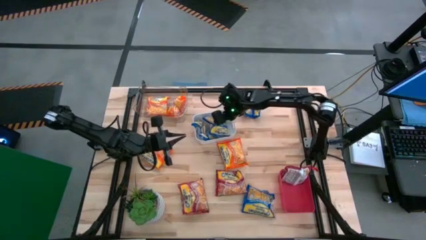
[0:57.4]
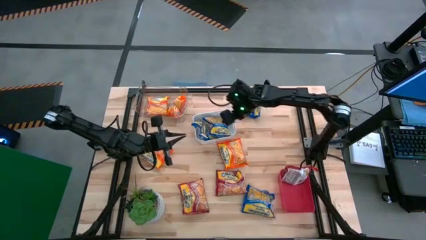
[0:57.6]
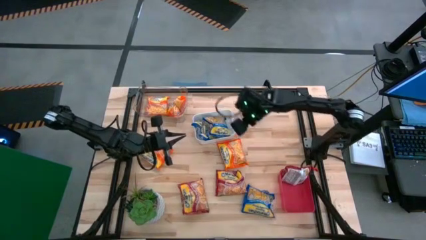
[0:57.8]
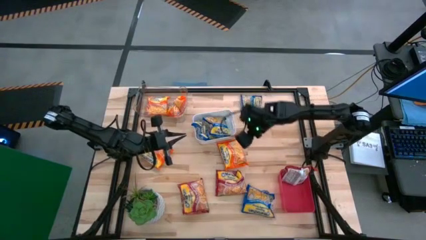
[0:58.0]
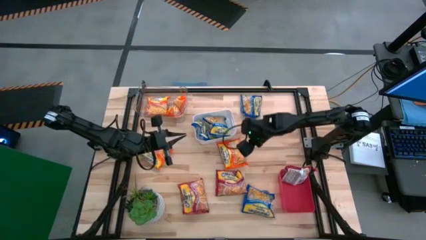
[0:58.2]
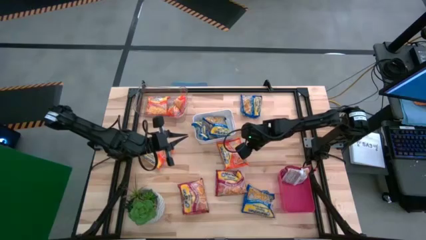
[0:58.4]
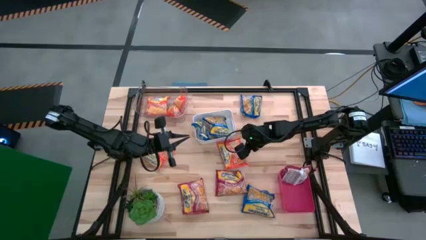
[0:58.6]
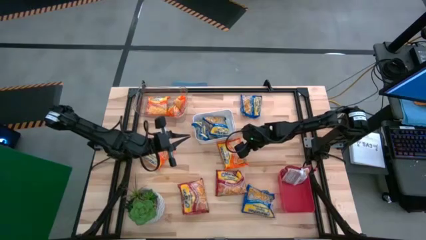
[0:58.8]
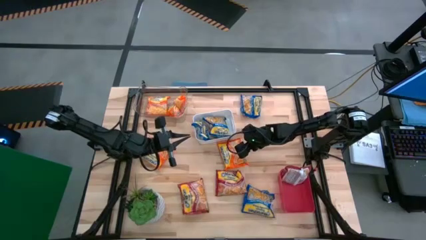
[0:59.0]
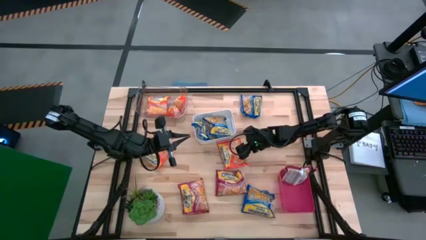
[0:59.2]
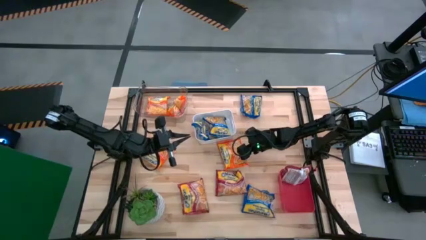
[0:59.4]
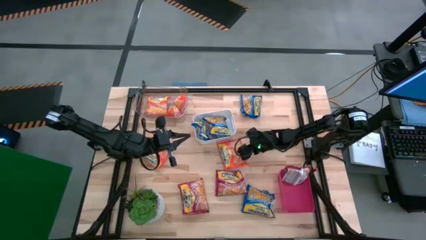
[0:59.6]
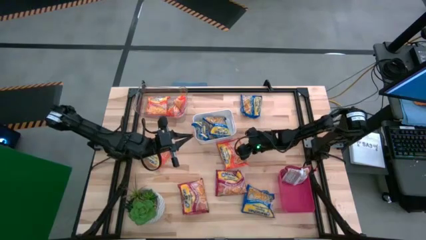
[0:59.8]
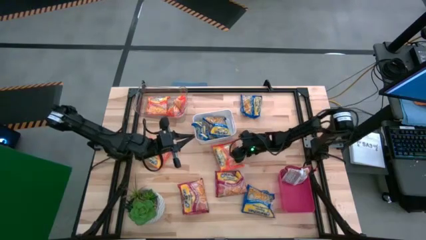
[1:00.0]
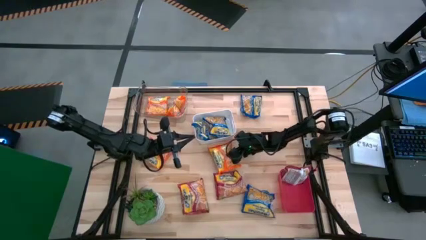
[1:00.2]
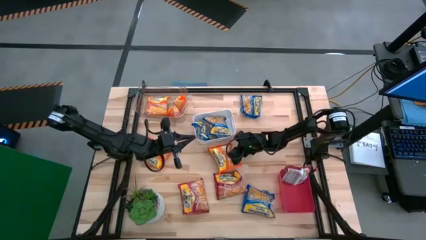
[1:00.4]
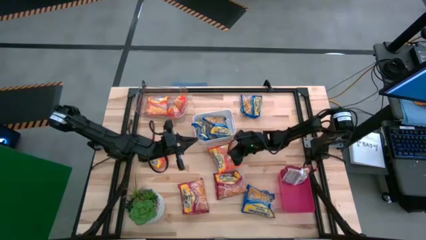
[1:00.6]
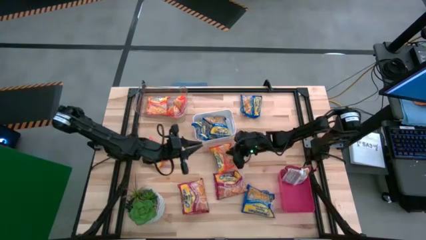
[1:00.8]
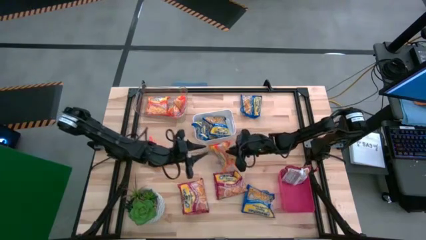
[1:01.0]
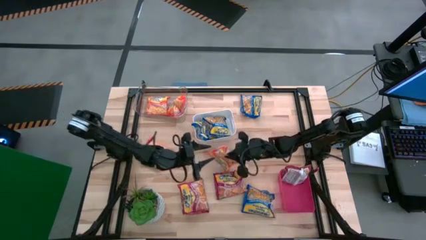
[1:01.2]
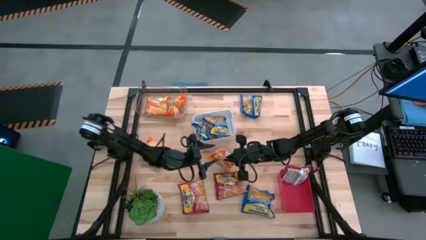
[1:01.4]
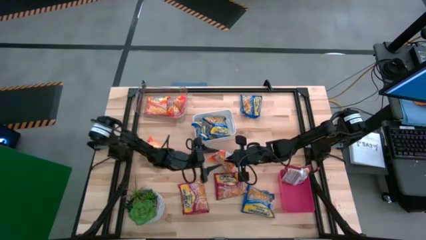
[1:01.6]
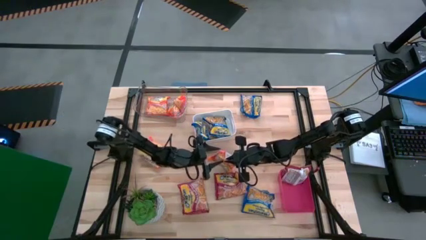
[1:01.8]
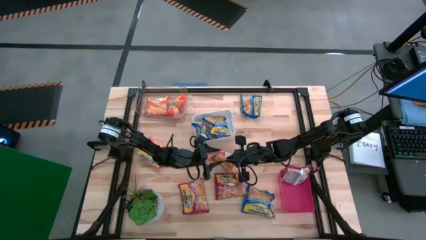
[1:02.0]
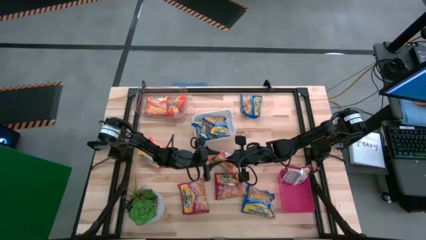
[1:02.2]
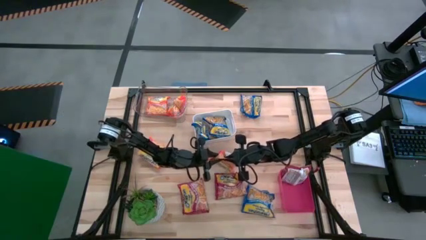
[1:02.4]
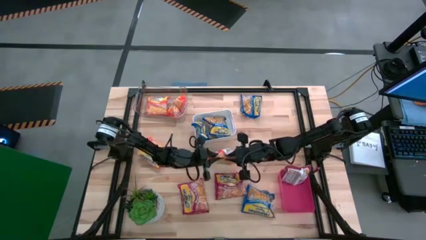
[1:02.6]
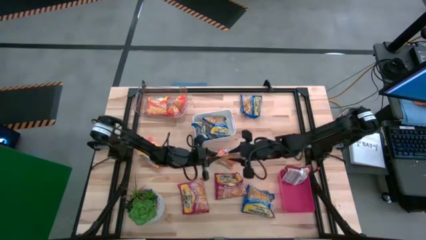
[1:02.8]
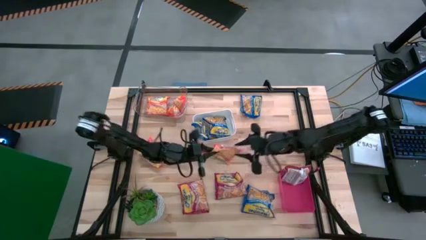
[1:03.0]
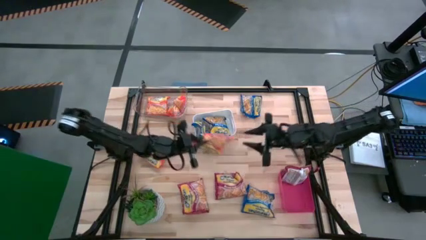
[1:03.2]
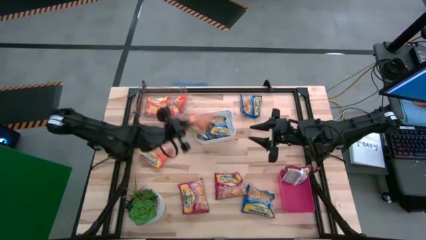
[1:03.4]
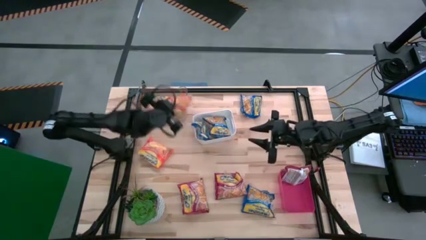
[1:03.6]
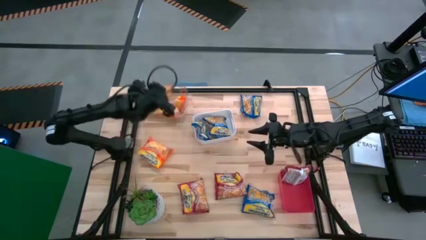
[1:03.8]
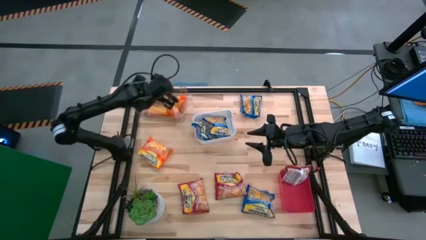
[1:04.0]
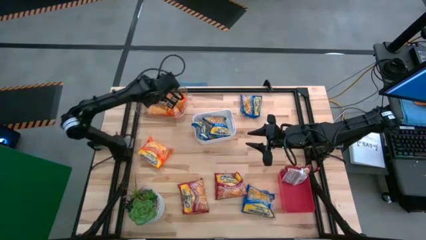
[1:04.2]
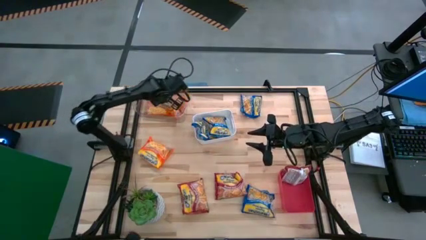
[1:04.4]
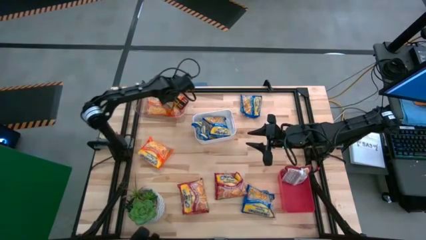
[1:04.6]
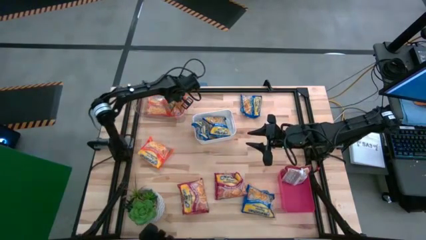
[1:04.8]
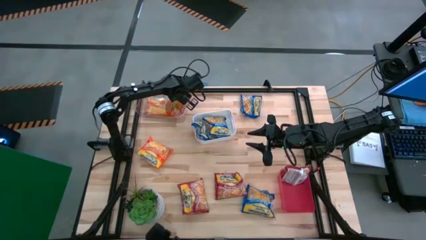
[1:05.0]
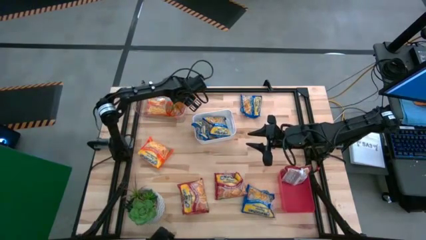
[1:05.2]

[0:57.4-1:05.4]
Task: Sort Maruchan noodles
Put the orange noodle pack into the transparent bin

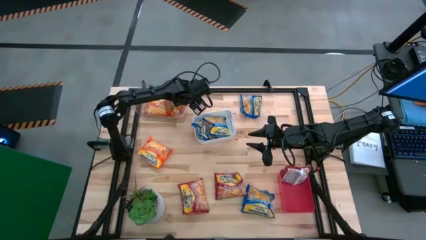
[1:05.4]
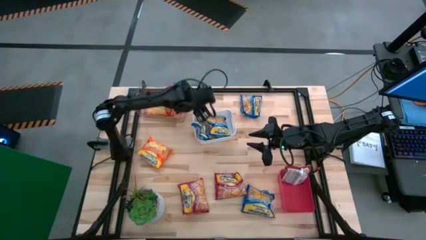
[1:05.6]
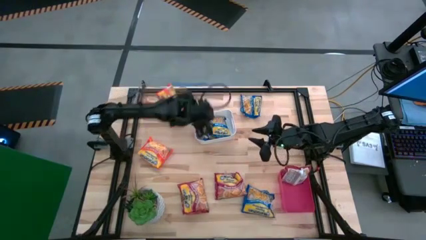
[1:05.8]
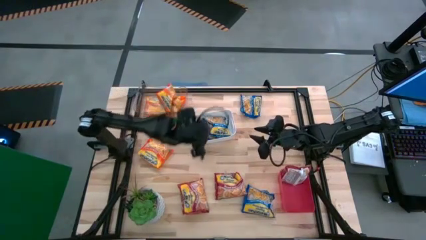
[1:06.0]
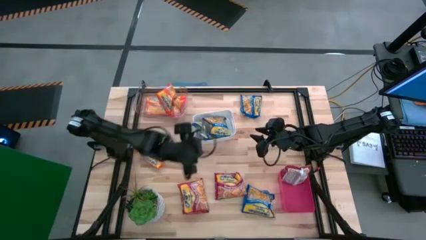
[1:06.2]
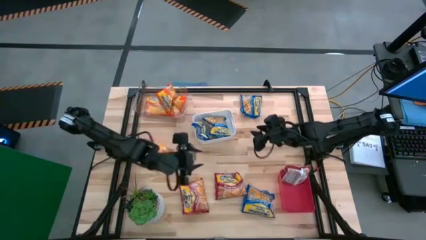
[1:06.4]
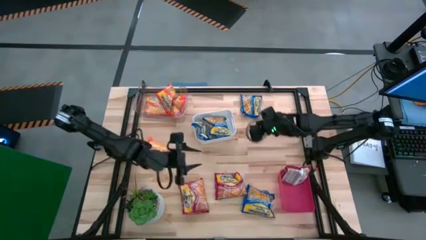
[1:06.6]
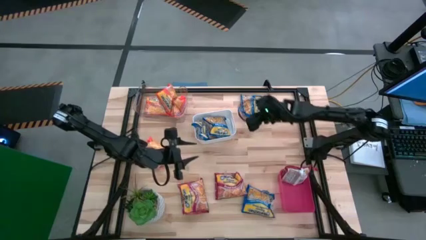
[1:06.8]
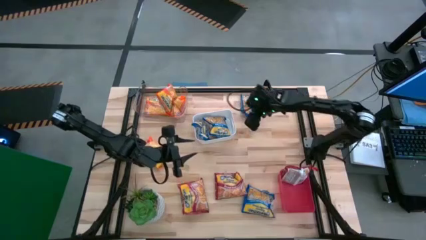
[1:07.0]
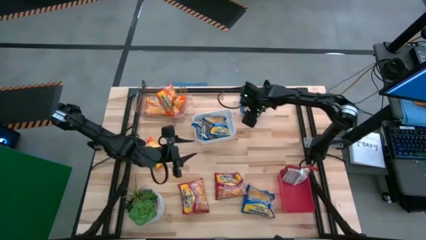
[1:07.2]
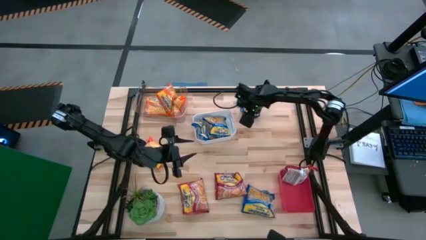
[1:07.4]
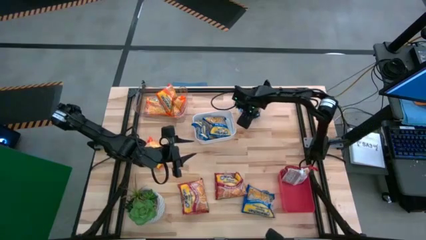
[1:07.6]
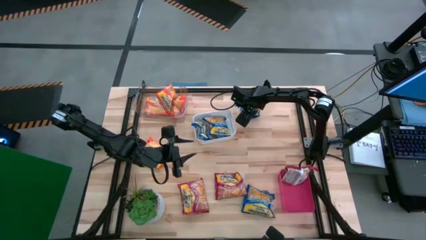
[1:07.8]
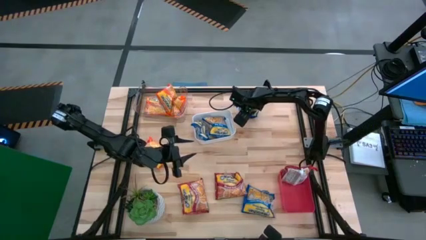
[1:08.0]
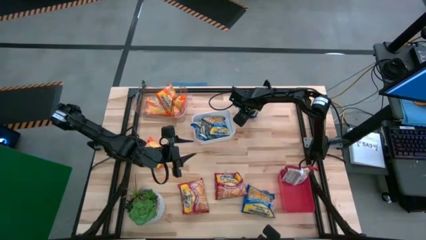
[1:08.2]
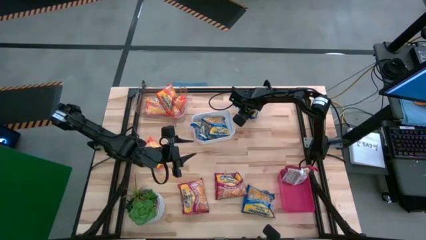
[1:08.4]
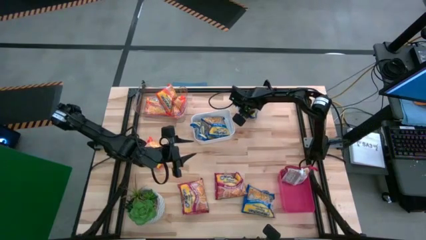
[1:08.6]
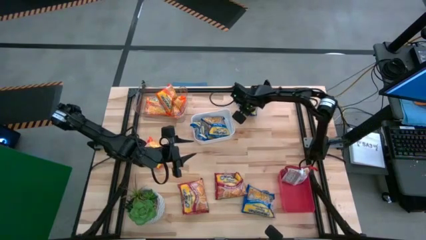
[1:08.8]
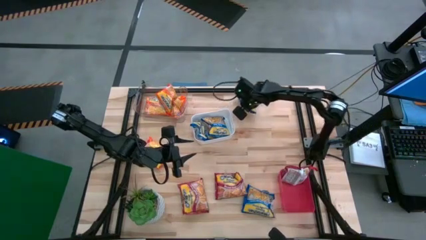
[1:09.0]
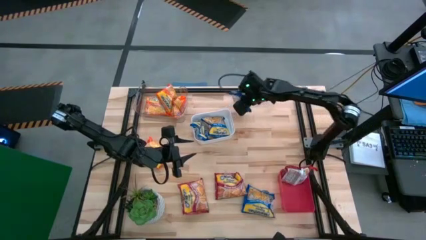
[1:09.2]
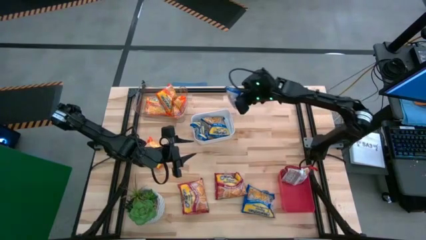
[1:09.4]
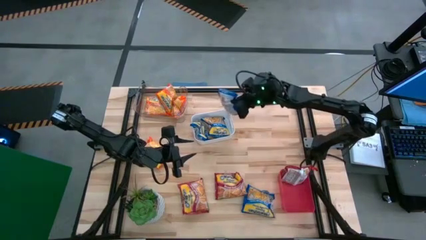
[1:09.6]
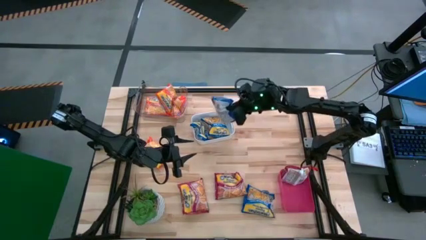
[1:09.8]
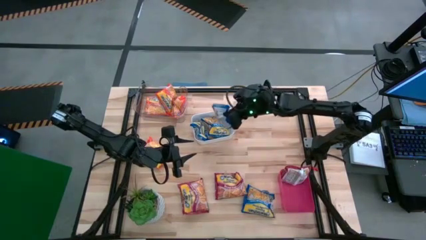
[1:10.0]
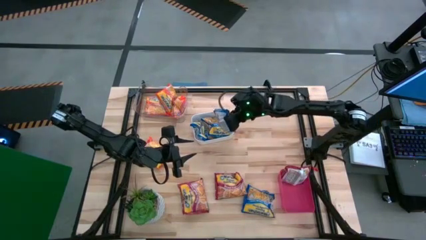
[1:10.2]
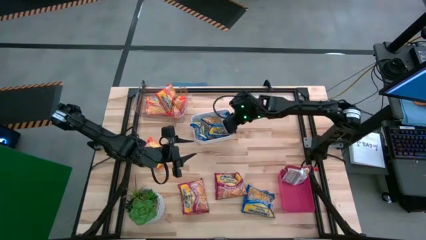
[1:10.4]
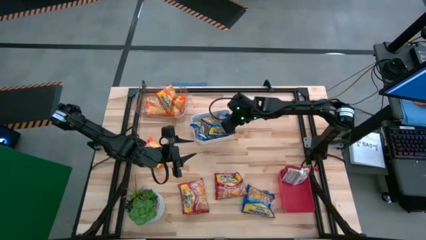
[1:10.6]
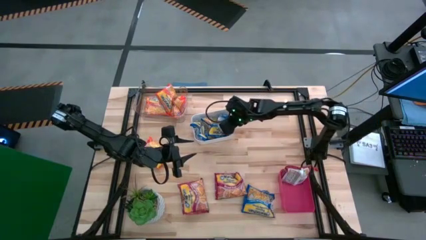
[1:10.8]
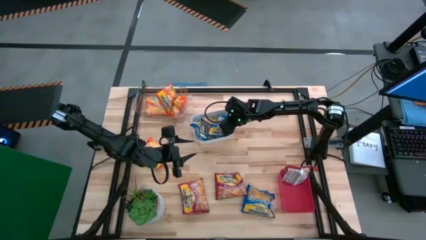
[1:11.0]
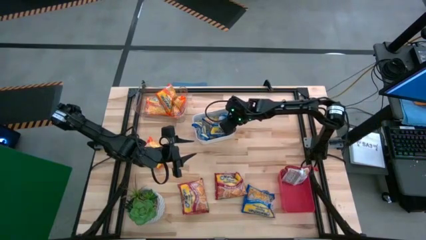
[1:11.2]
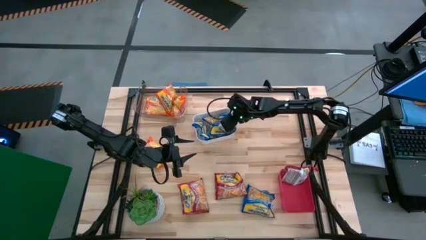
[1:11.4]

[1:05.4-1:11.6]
Put the blue noodle pack into the white bin

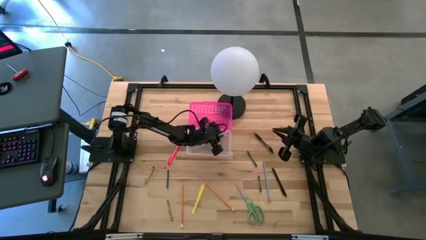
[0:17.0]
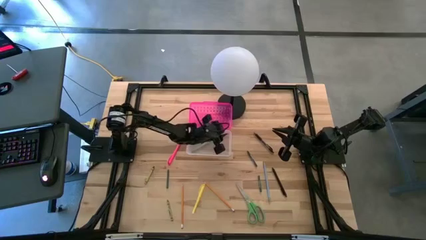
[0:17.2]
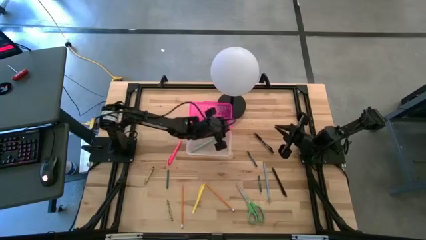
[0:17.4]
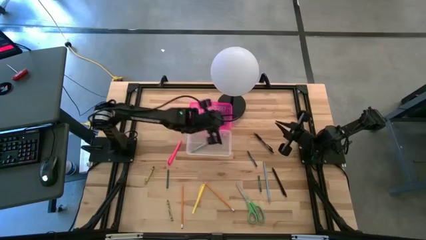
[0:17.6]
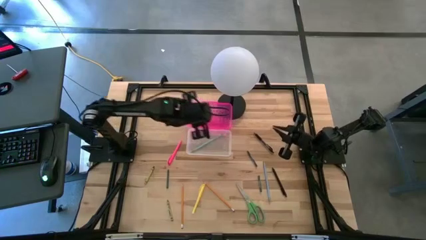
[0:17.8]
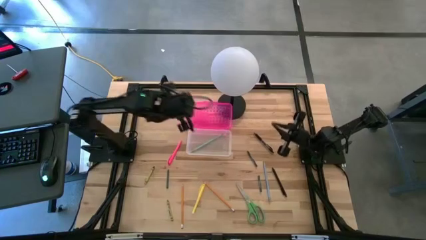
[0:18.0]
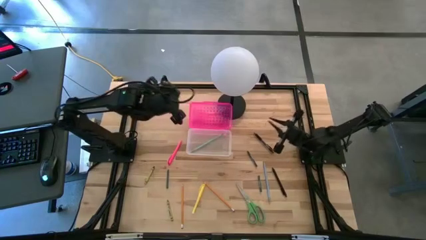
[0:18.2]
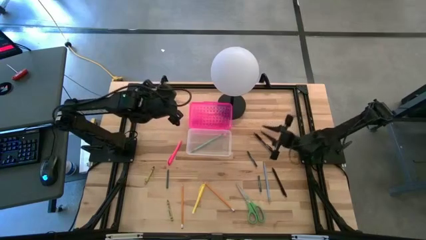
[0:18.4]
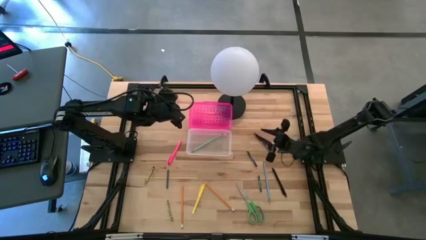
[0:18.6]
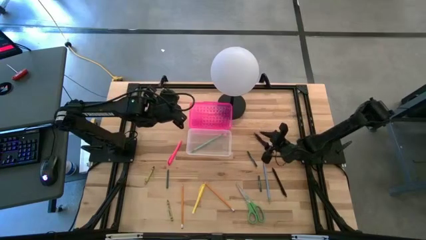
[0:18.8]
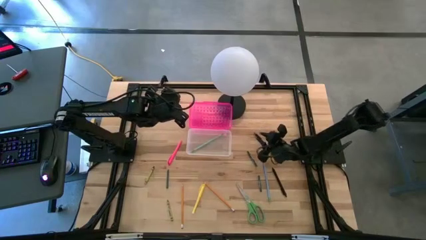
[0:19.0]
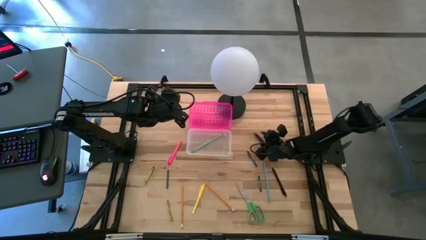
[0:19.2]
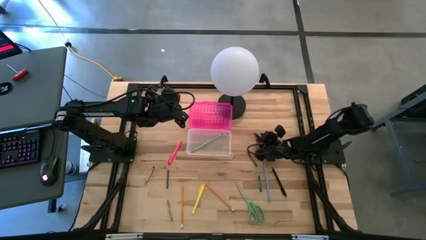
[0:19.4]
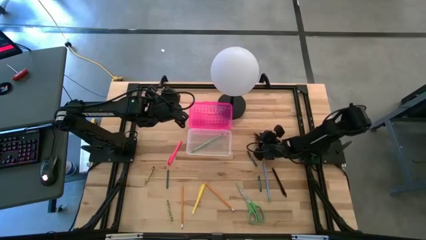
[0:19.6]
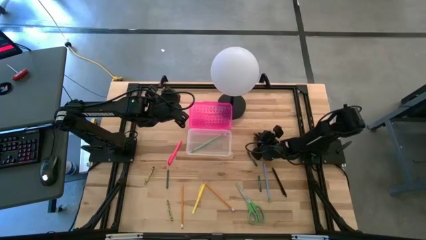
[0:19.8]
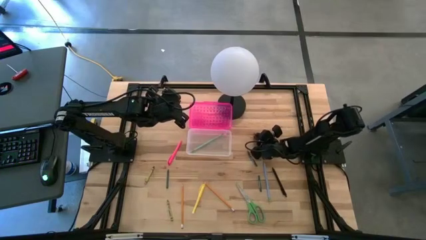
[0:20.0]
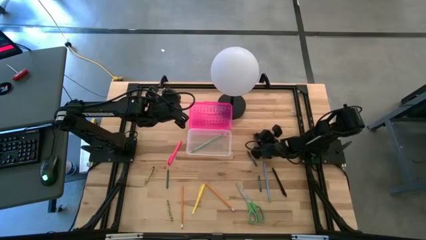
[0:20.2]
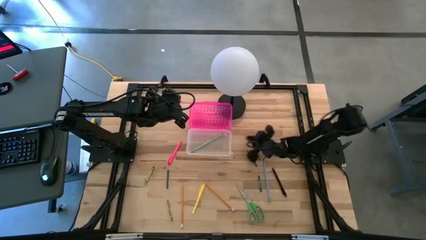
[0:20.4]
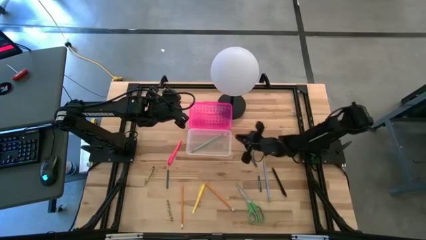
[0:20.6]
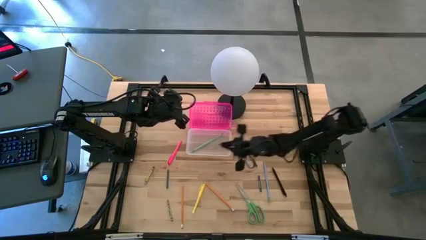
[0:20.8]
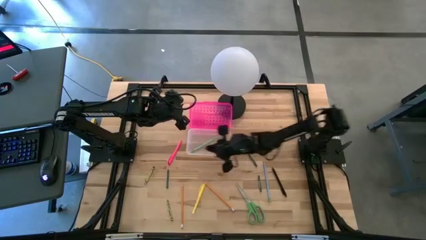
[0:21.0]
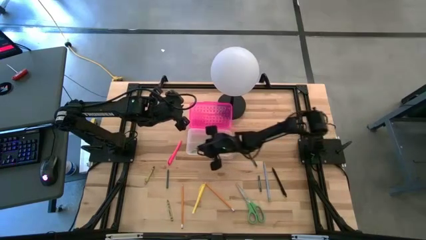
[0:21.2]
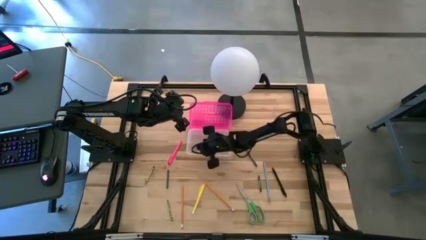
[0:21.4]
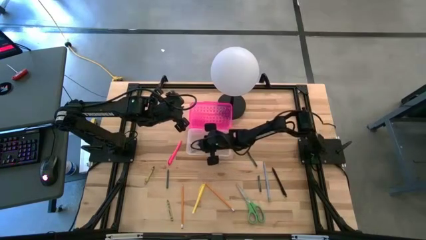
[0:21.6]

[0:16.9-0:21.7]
Task: Pick & place school supplies into a supply box
Put the top black pen into the pink supply box
